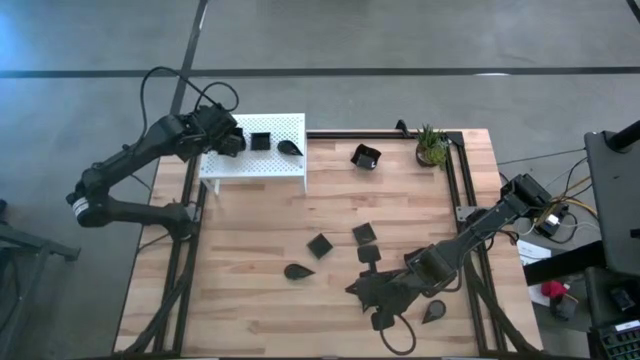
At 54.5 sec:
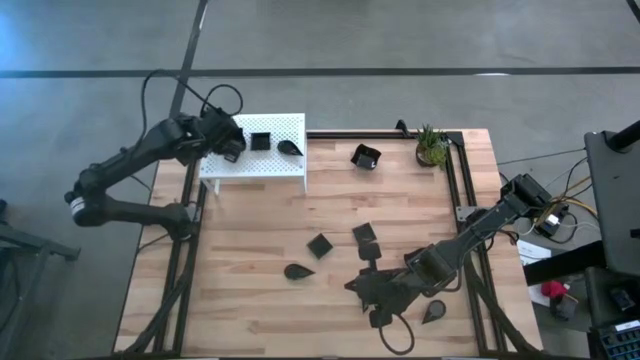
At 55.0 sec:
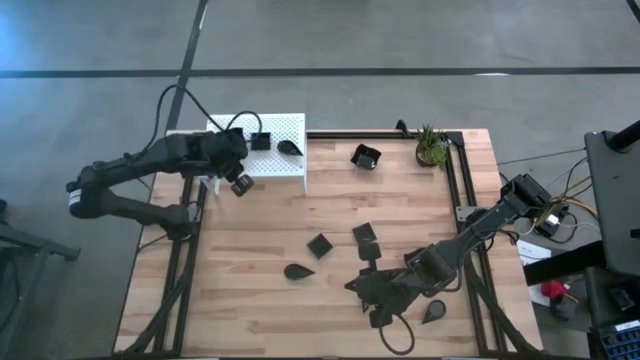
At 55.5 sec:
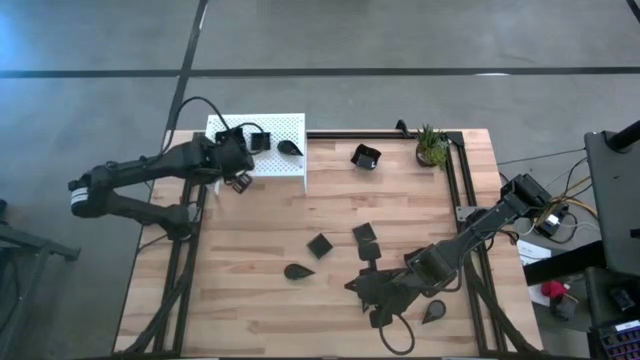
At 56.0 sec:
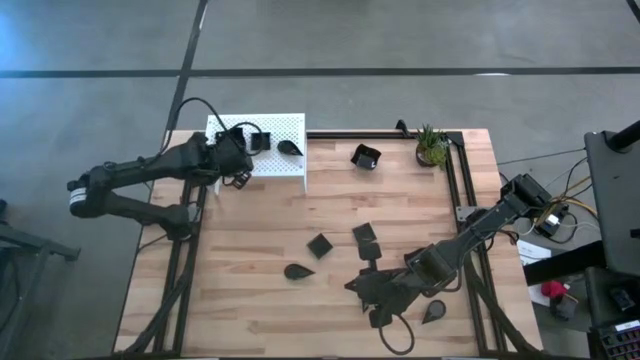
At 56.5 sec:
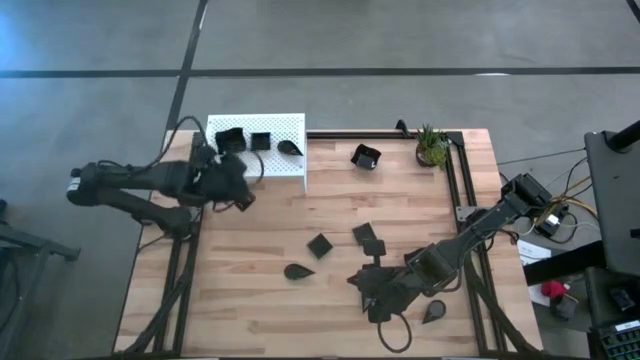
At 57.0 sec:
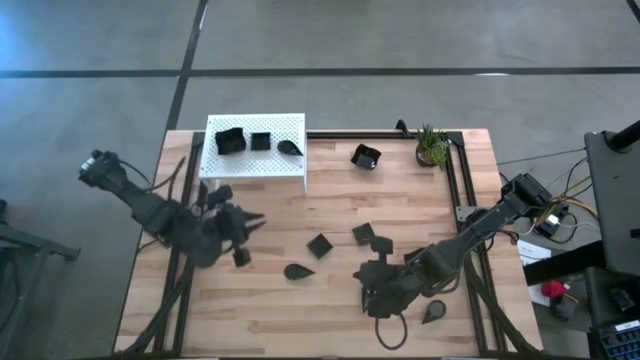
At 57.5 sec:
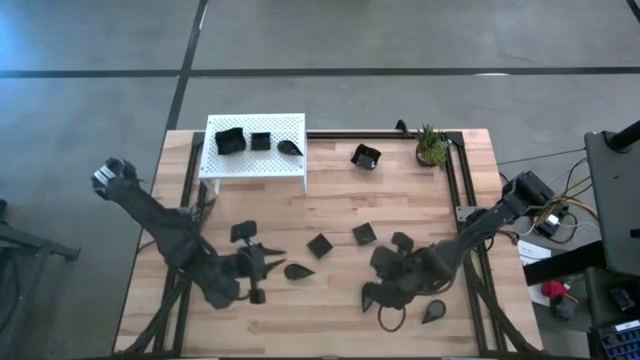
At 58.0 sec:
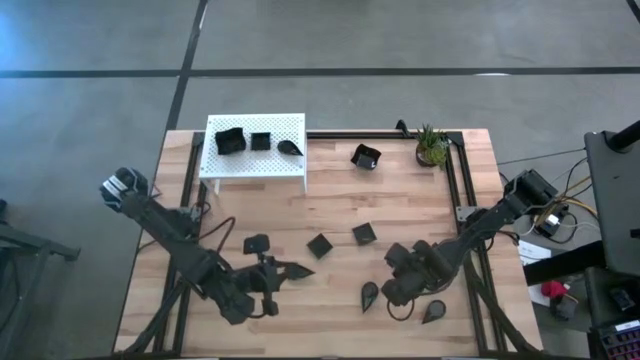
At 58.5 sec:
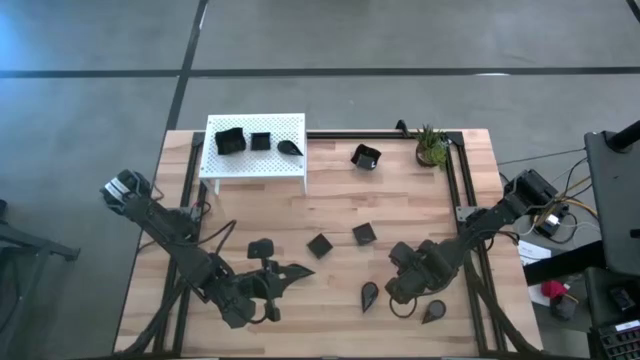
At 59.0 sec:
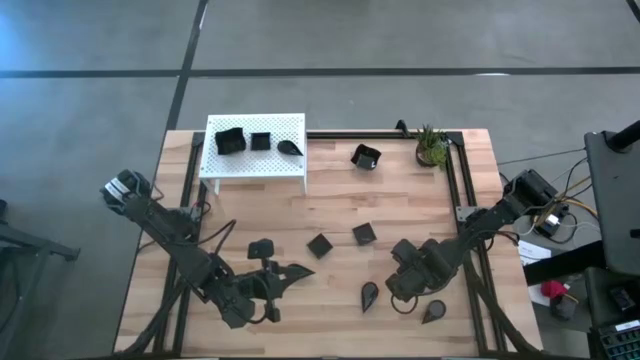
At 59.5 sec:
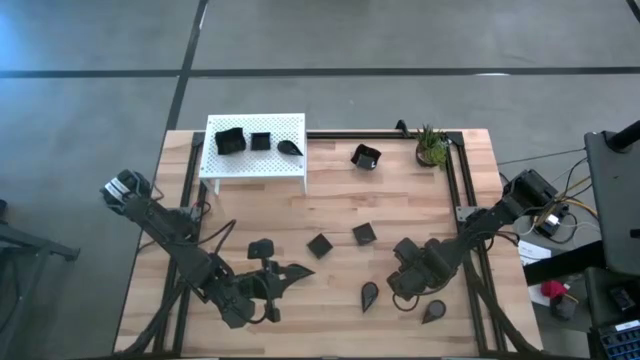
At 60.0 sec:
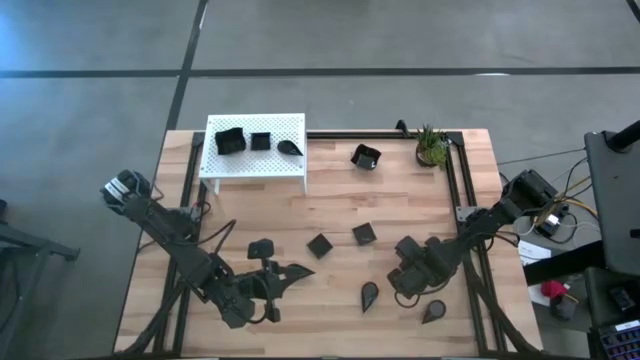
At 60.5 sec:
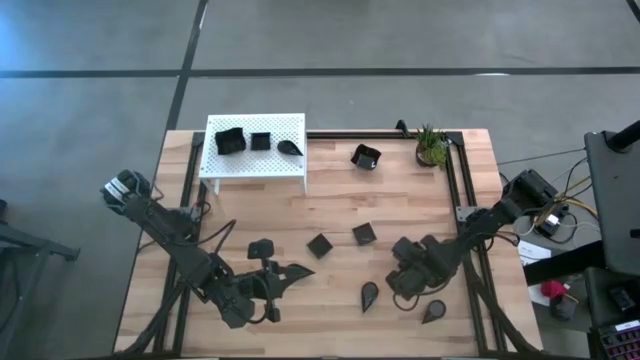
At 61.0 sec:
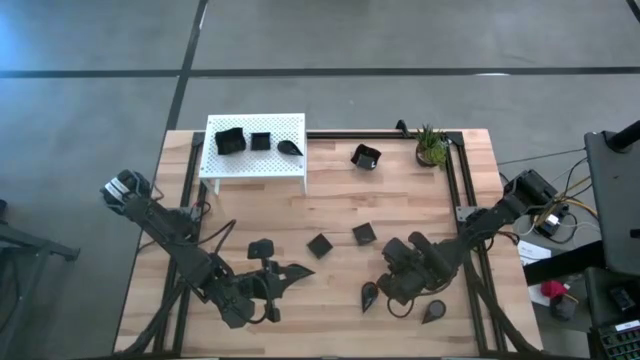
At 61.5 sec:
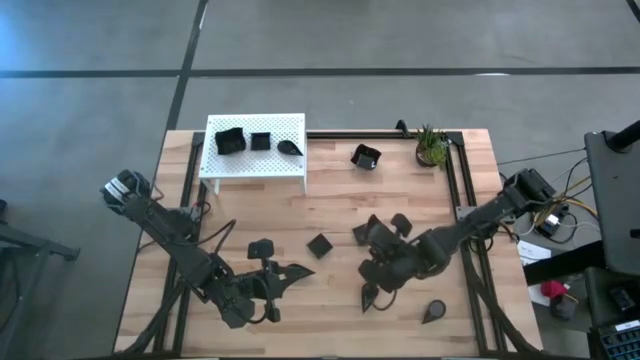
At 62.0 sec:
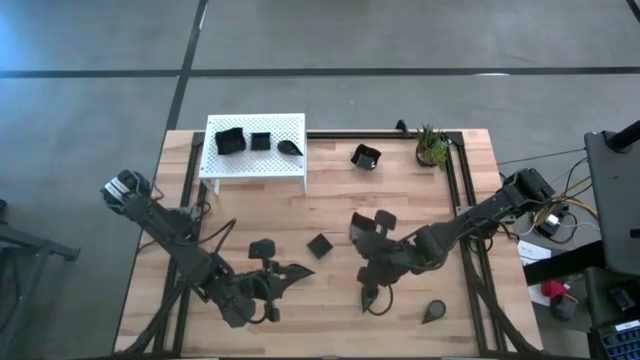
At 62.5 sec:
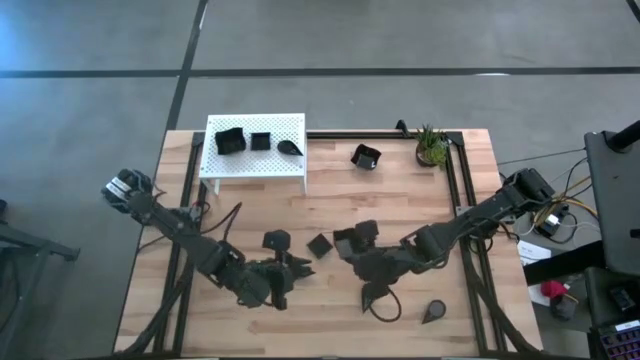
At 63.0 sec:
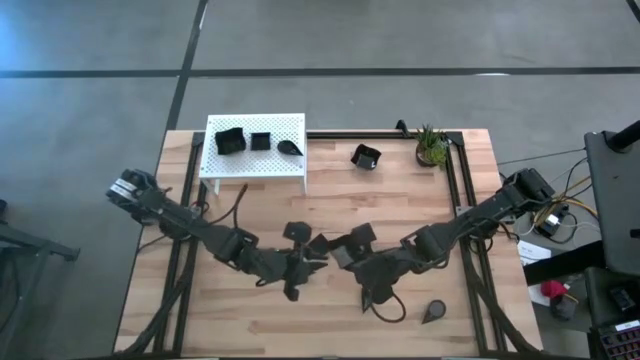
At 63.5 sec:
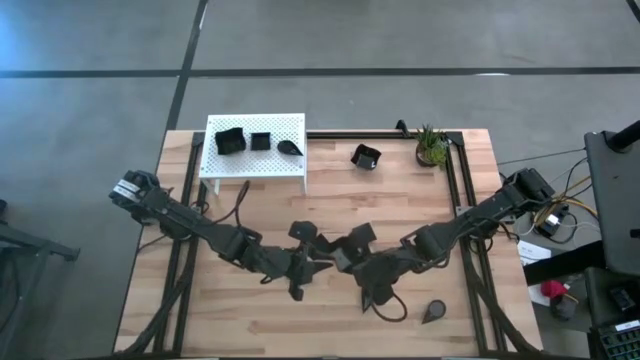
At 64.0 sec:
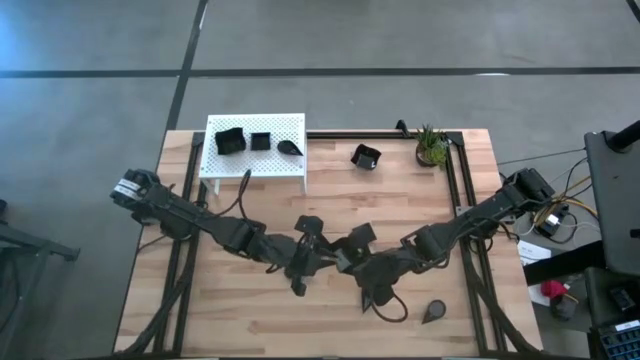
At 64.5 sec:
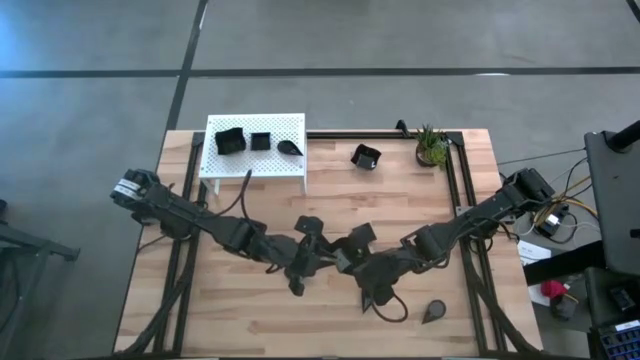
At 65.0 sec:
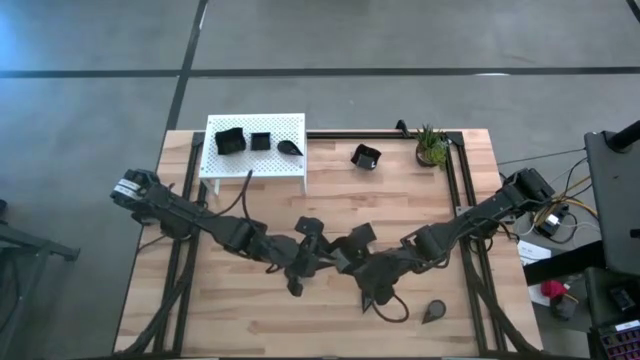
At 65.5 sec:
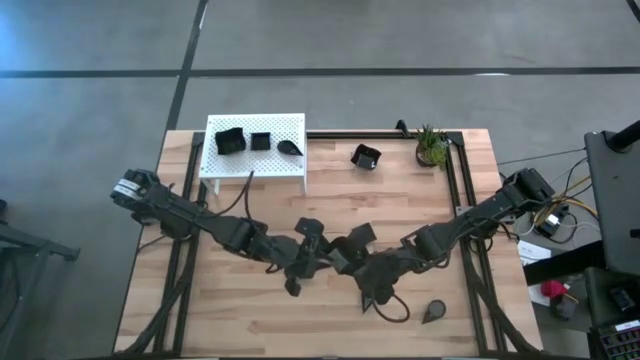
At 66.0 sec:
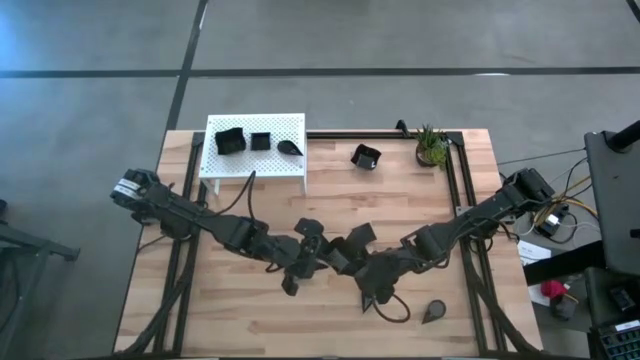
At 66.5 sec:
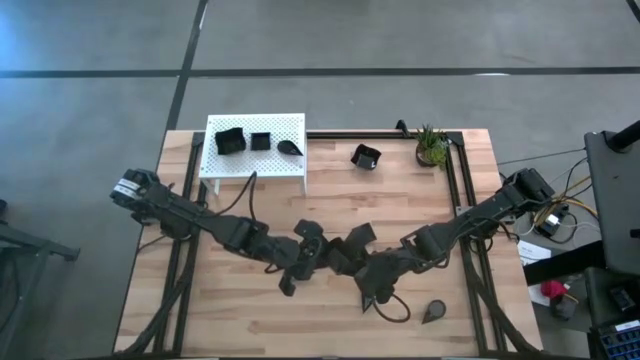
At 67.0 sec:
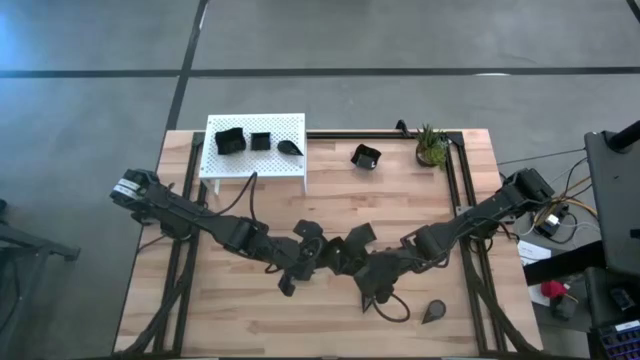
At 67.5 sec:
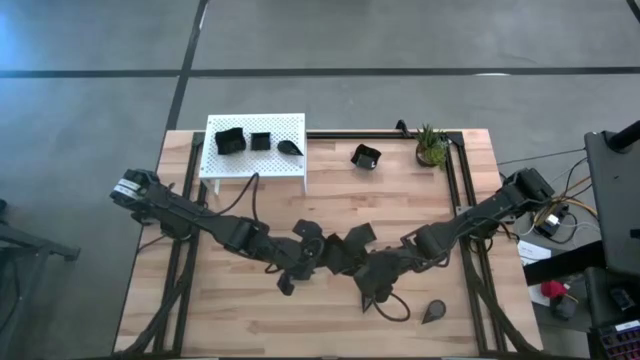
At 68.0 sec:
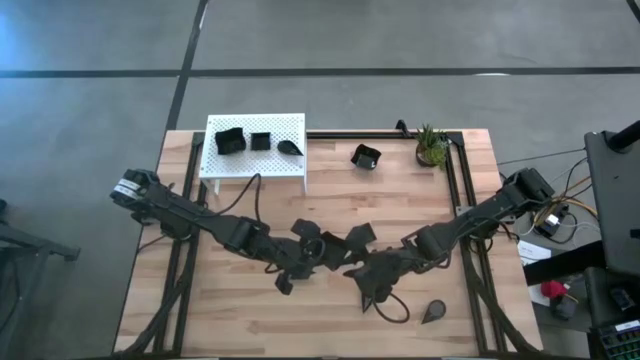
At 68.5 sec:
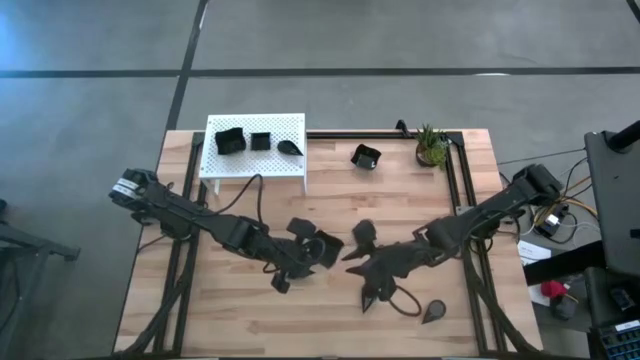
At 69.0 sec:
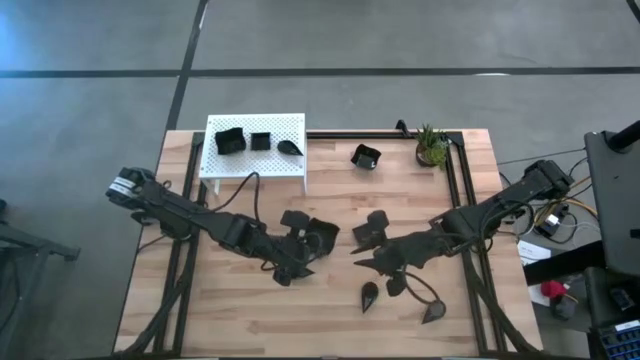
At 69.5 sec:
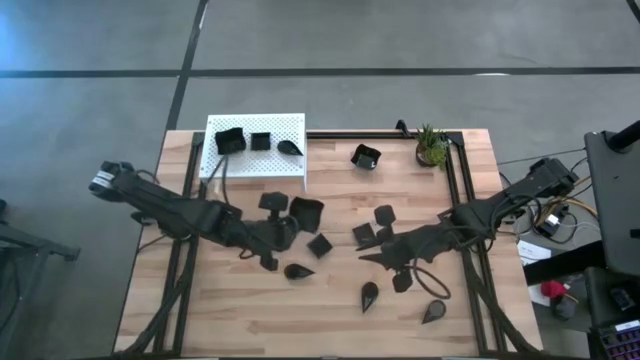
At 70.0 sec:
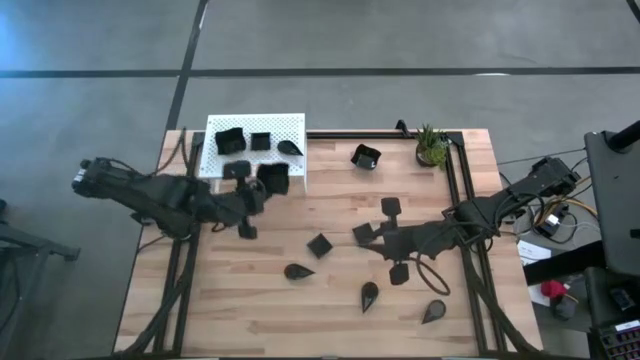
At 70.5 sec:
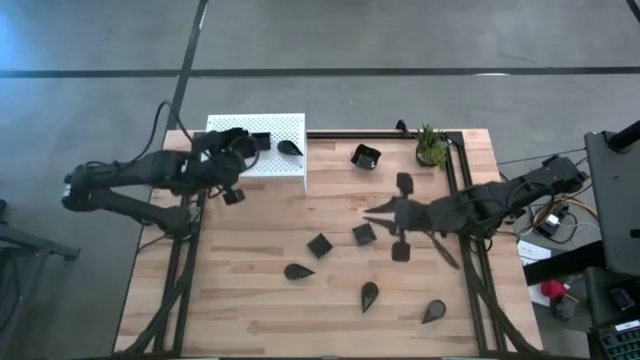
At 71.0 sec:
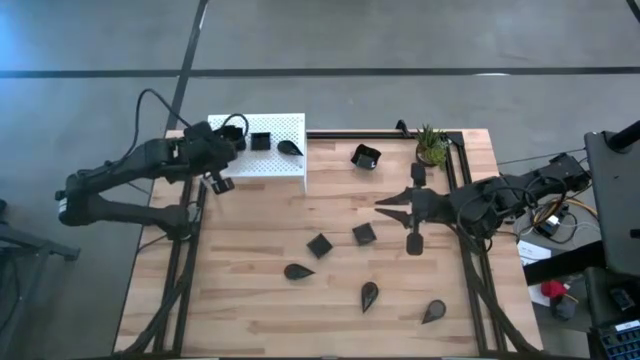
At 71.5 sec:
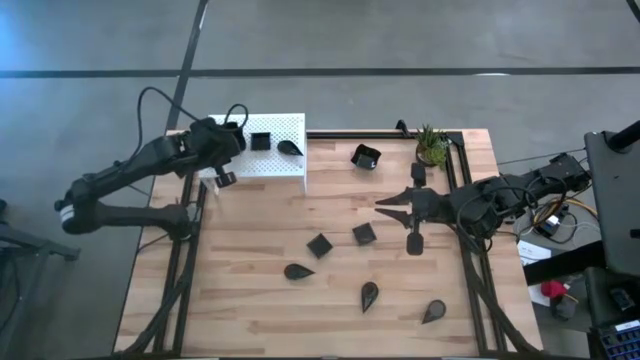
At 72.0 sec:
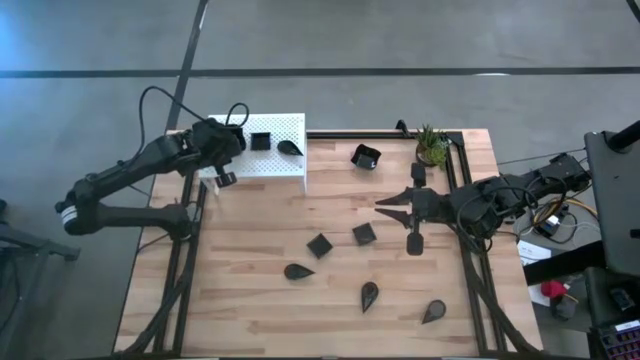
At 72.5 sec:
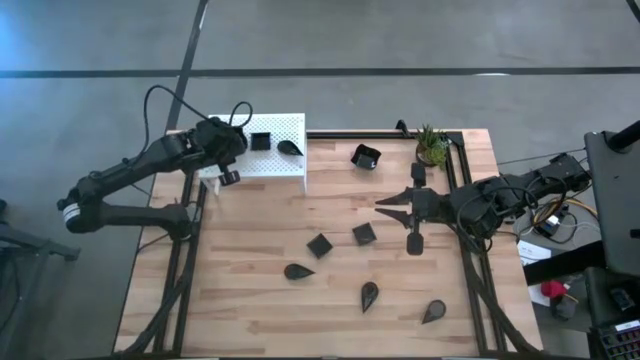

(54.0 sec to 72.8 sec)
Task: Pick & Place Mini shaped plates
Stack the distorted square plate on top of the other distorted square plate on the shelf
